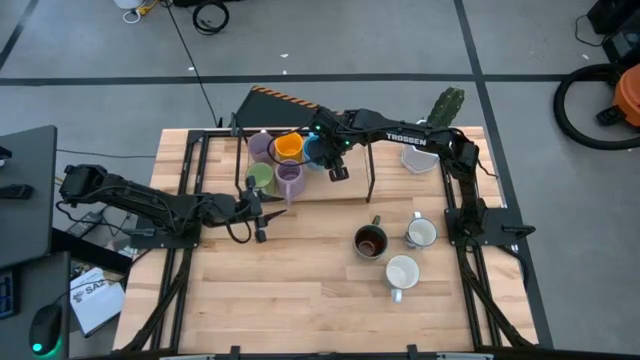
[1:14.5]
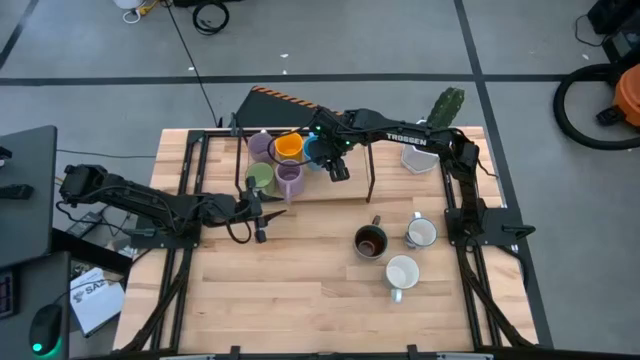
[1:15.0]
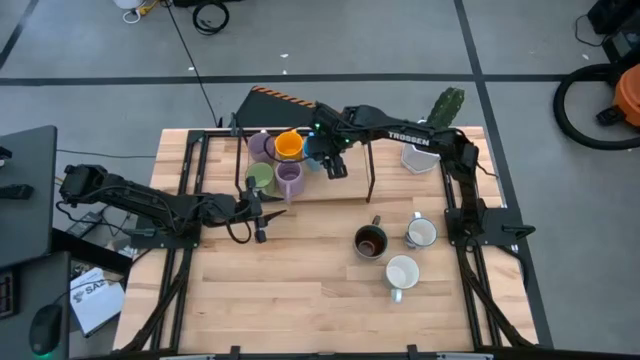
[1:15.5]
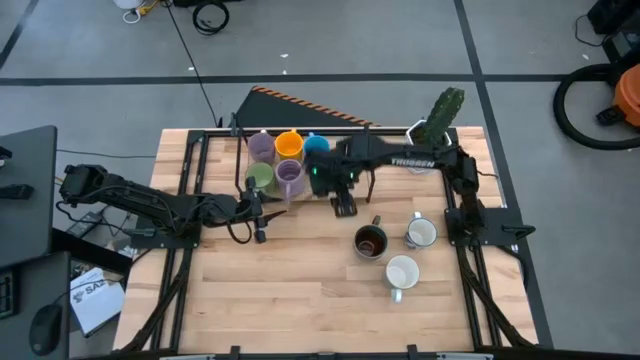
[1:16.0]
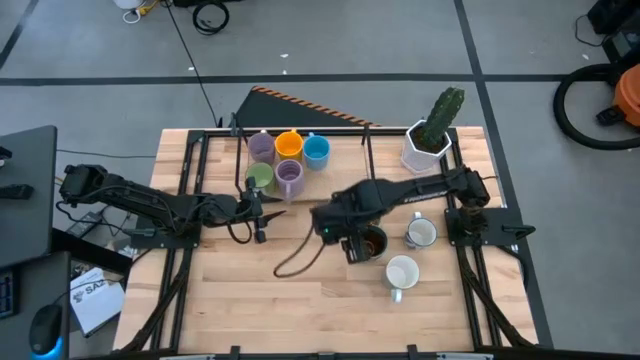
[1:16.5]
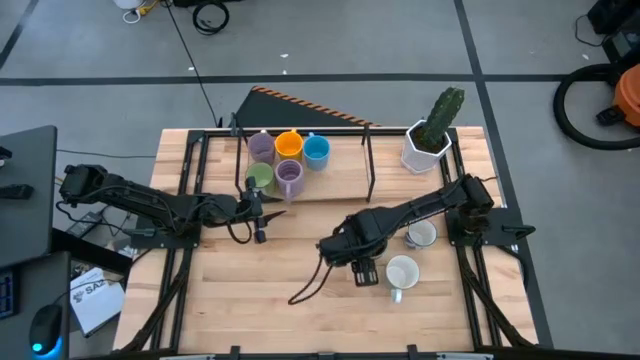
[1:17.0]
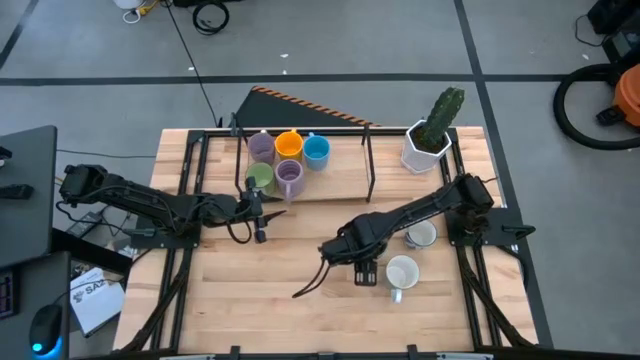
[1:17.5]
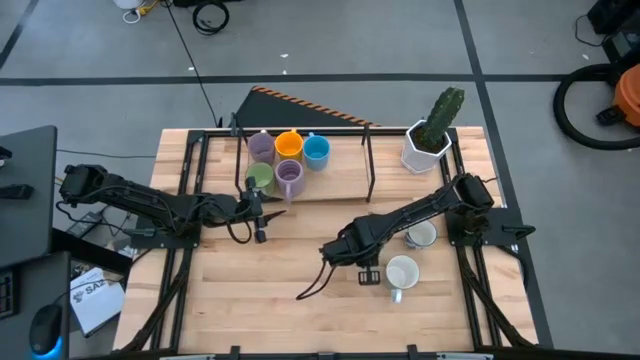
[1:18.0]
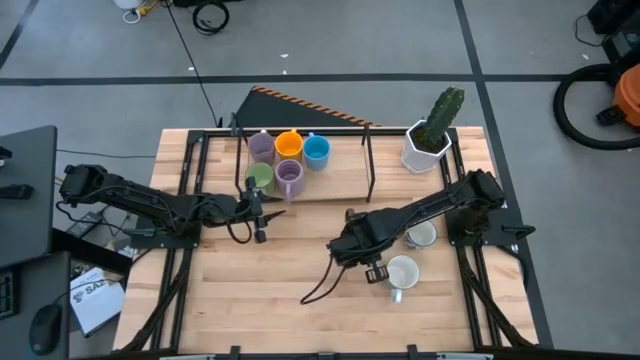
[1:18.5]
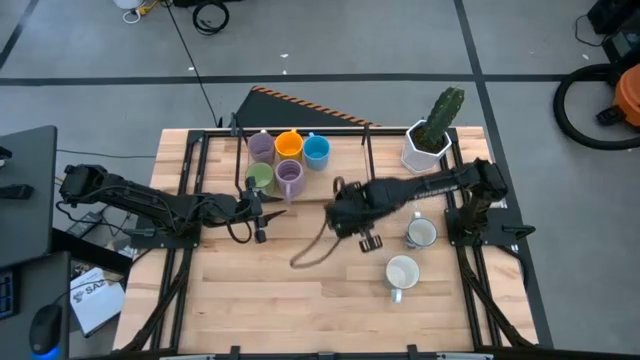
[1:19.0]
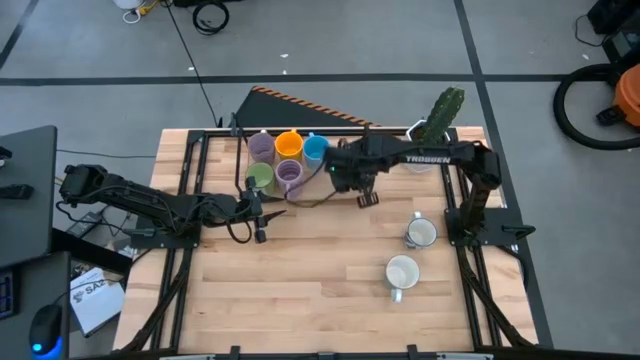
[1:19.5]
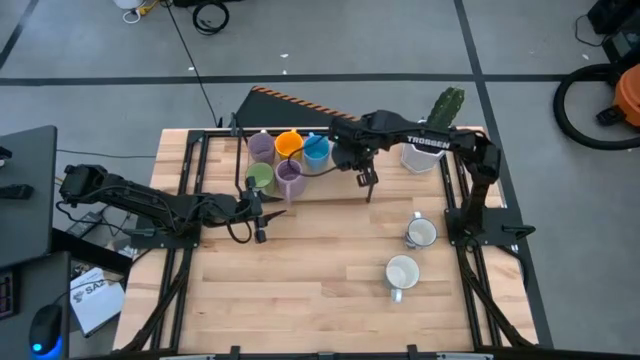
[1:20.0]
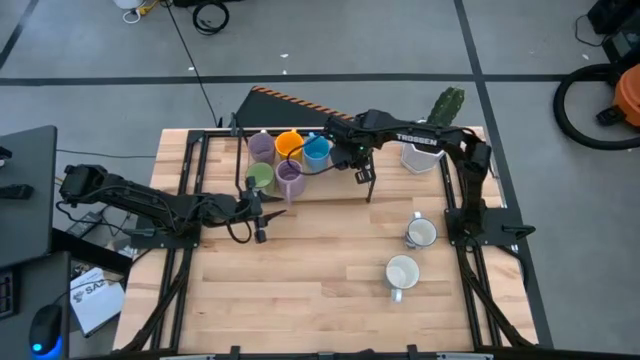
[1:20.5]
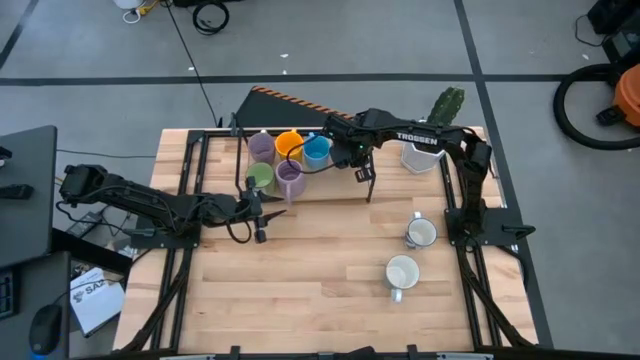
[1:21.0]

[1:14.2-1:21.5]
Task: Place coffee mugs
Put the dark blue mug on the shelf

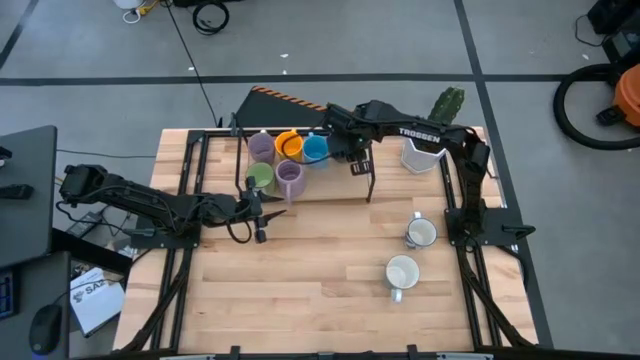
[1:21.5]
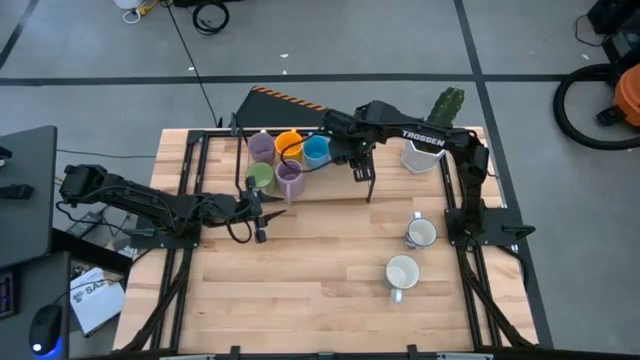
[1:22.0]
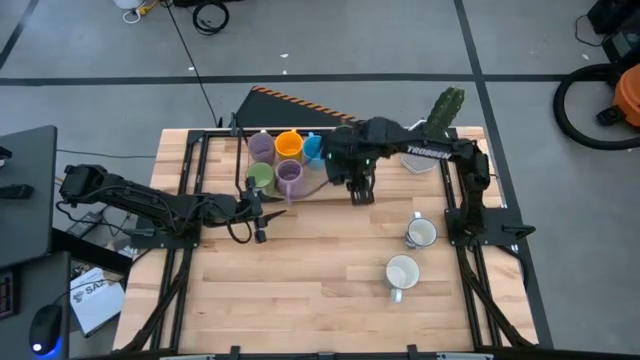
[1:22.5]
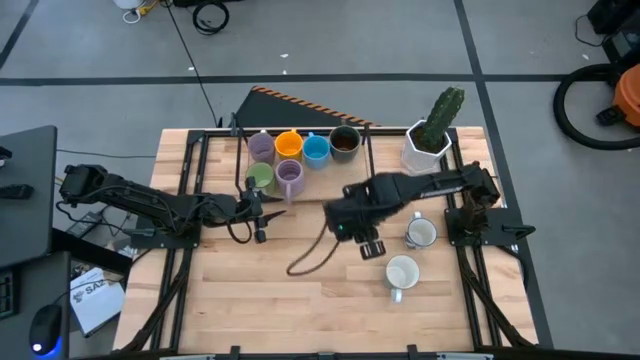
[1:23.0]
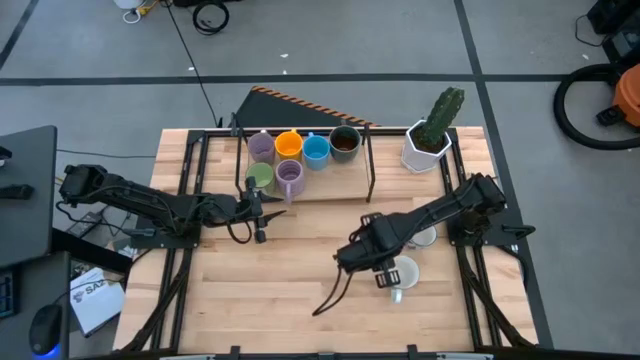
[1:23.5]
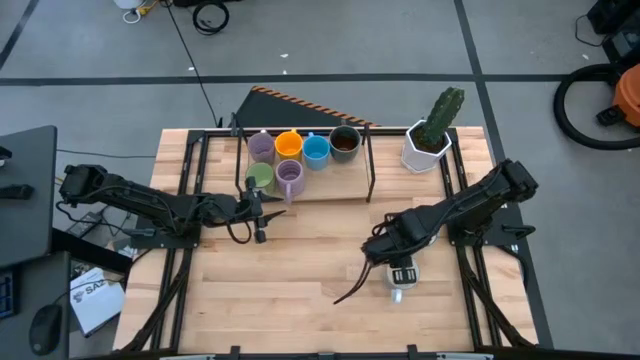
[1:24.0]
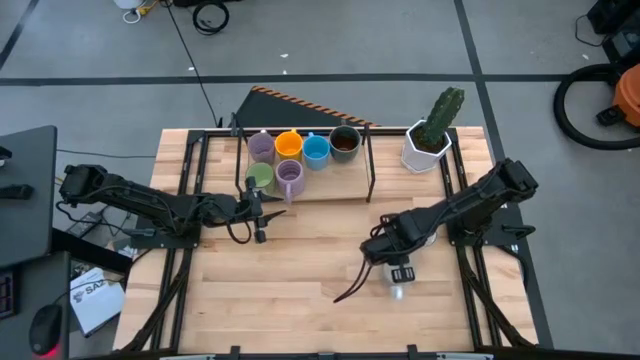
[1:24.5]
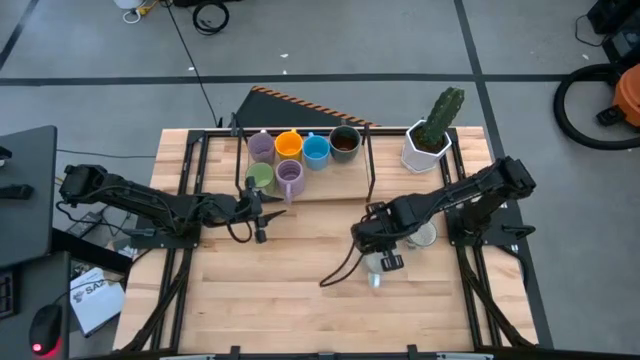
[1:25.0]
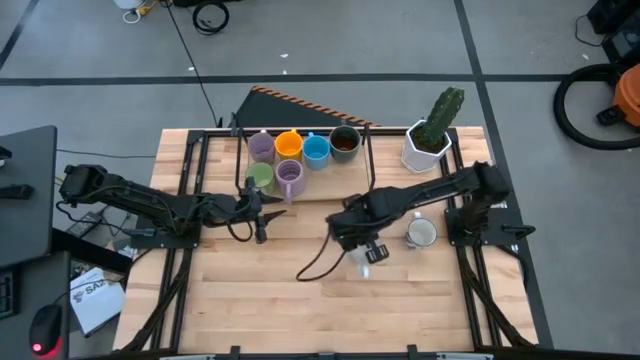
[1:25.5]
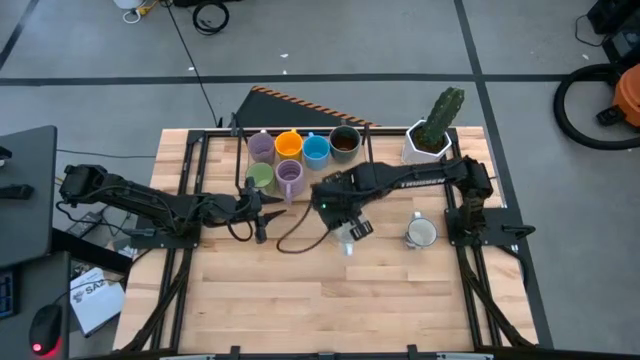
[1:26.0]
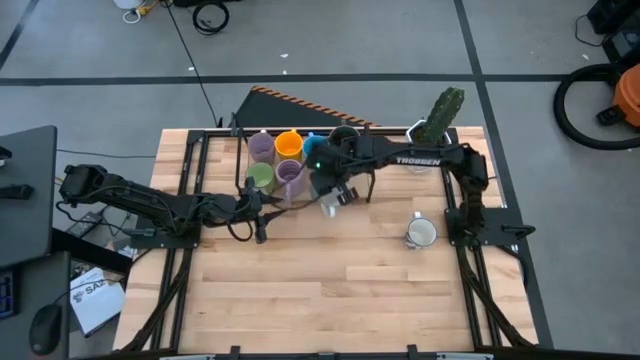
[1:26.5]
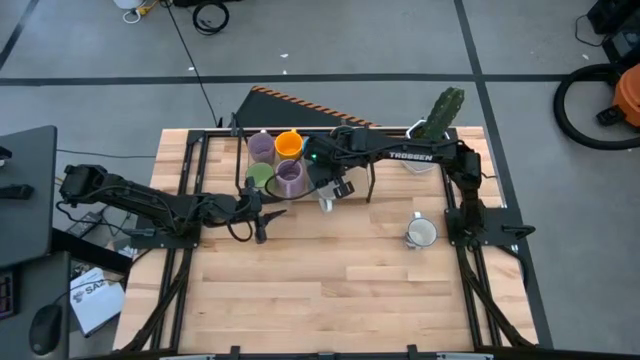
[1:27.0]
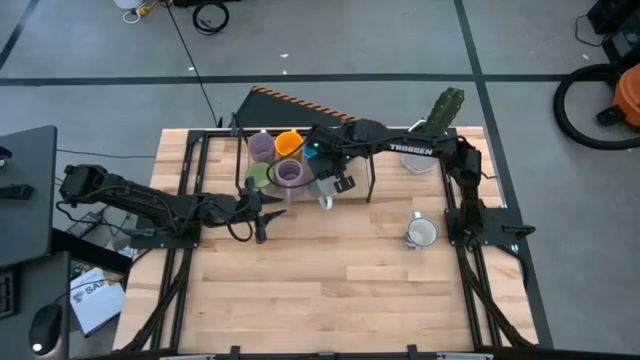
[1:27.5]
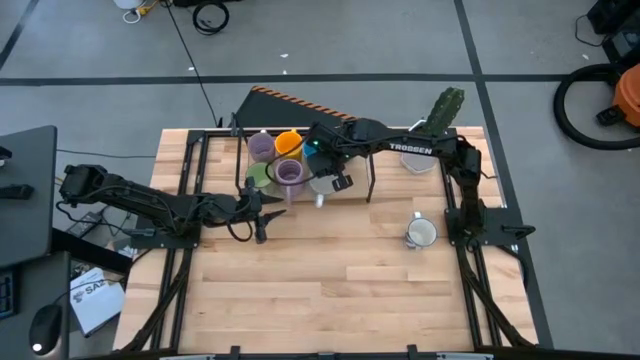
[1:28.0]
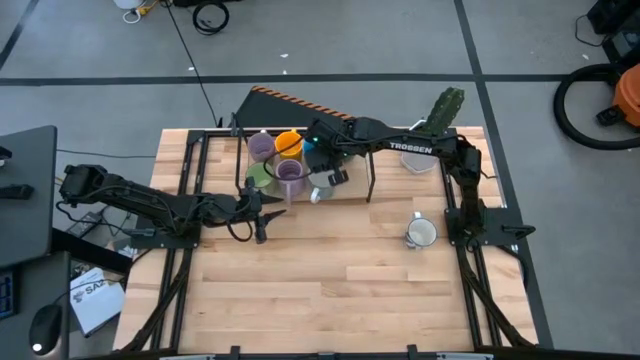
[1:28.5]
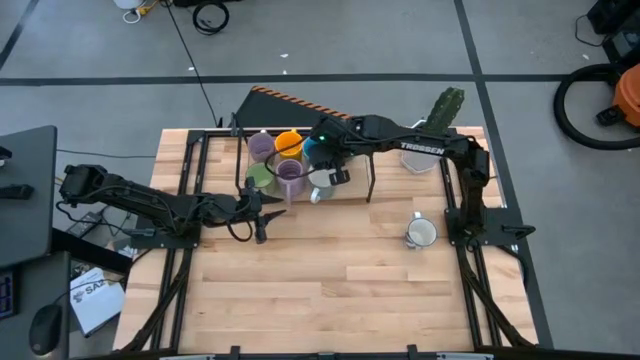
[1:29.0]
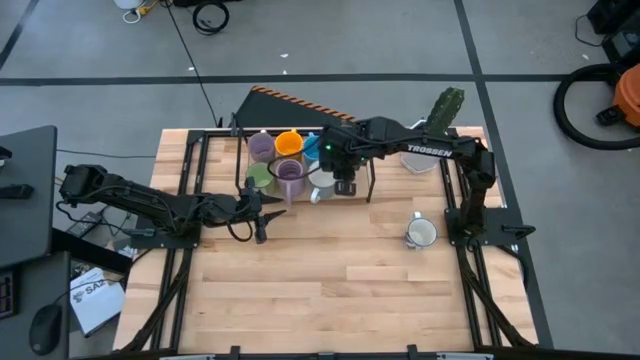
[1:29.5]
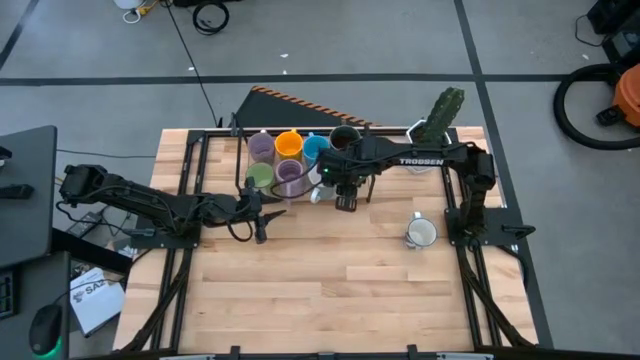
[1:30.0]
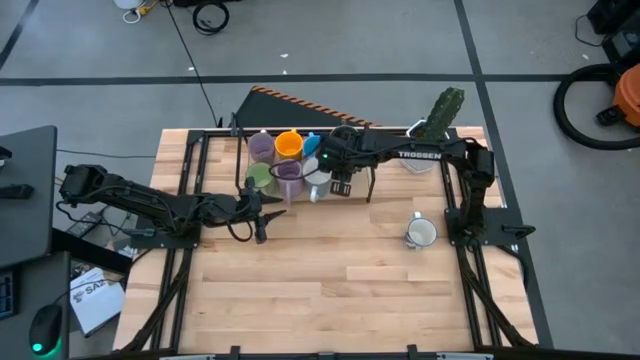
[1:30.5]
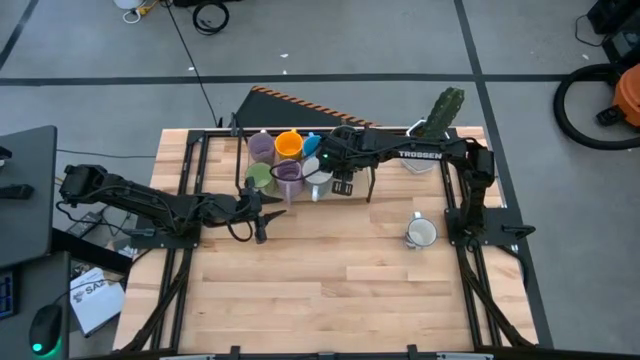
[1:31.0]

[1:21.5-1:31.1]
Put the light blue mug on the shelf

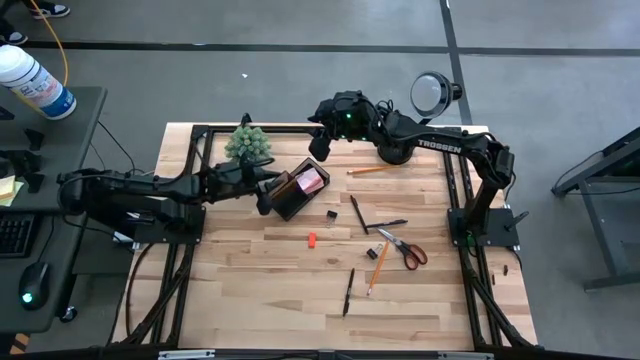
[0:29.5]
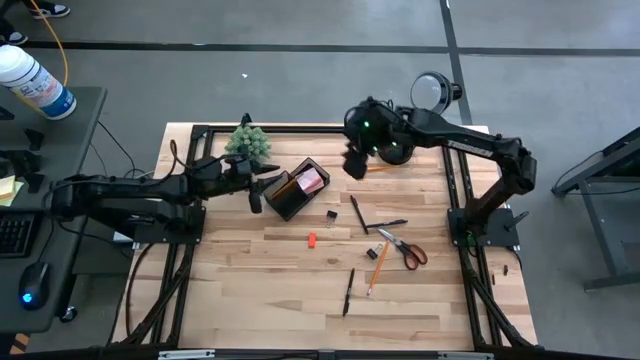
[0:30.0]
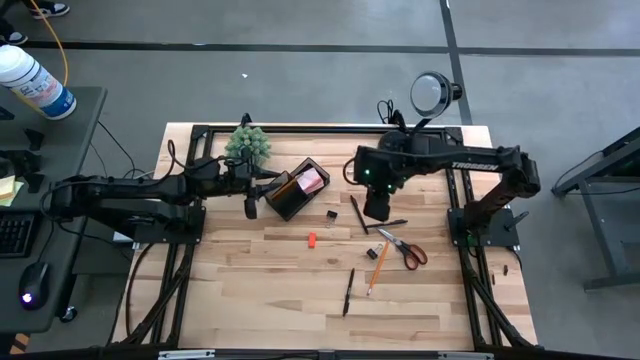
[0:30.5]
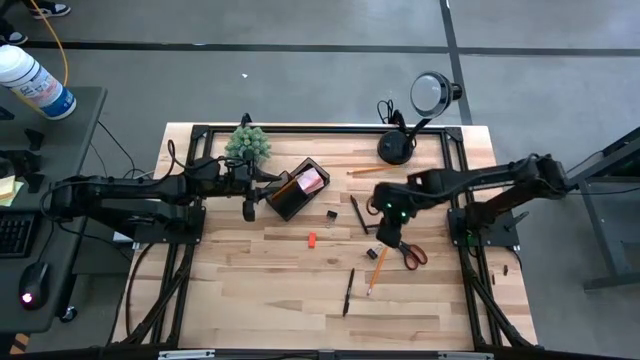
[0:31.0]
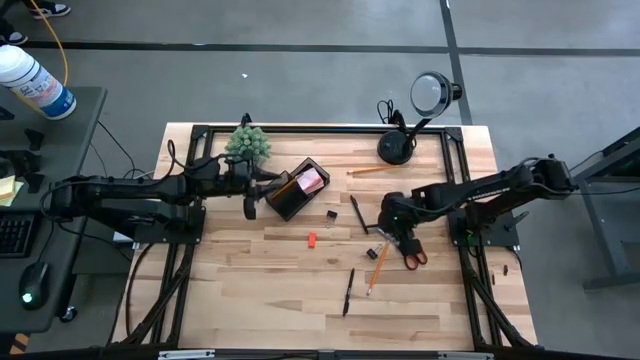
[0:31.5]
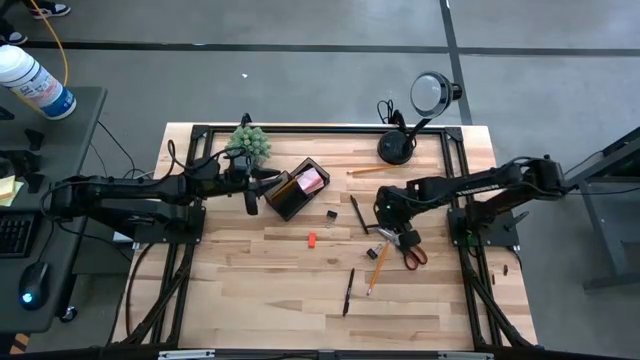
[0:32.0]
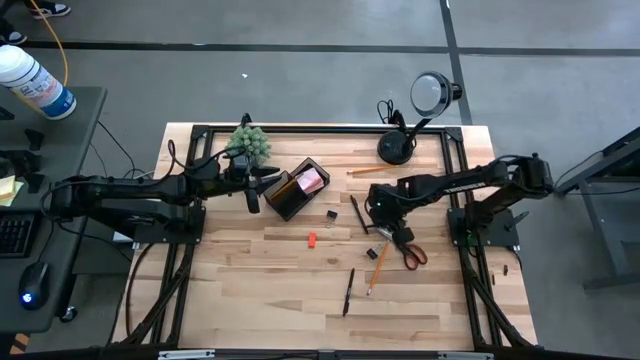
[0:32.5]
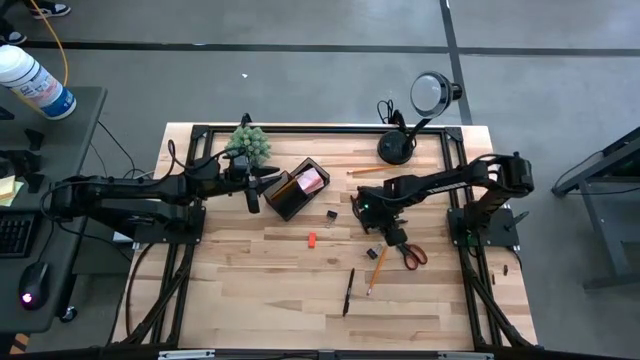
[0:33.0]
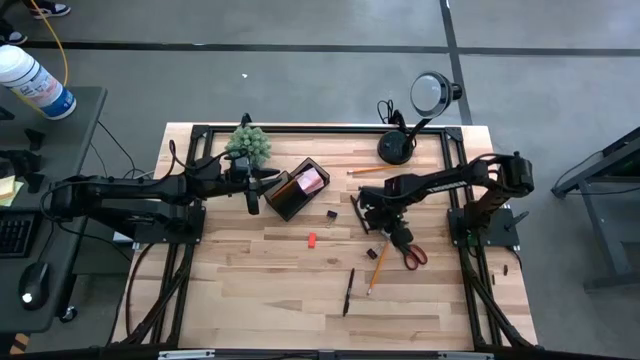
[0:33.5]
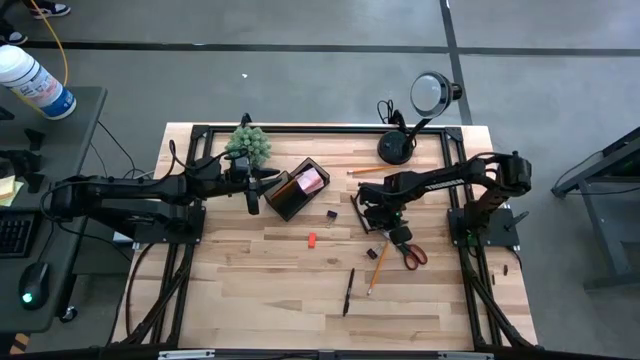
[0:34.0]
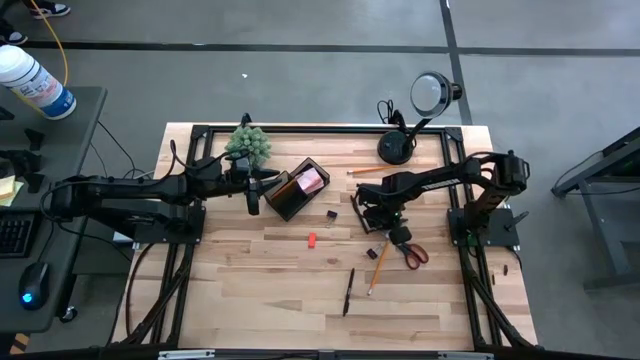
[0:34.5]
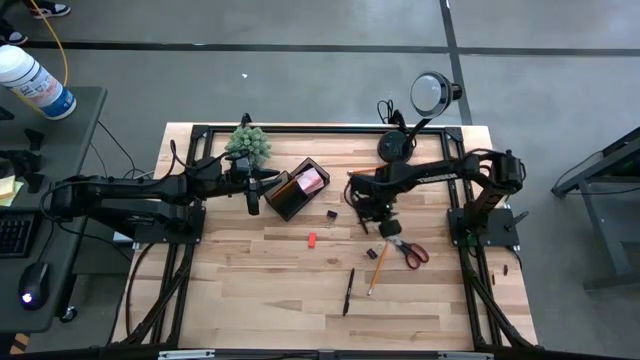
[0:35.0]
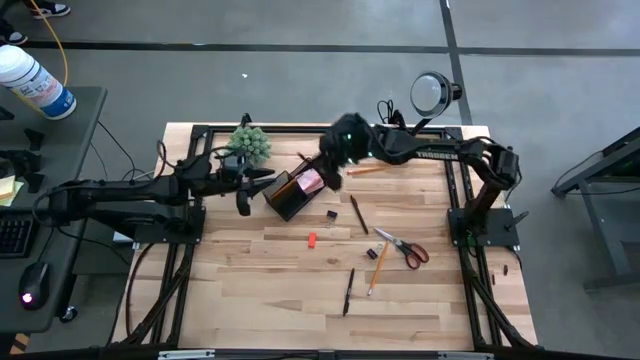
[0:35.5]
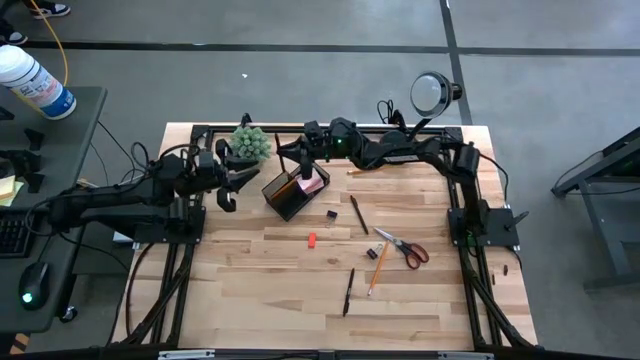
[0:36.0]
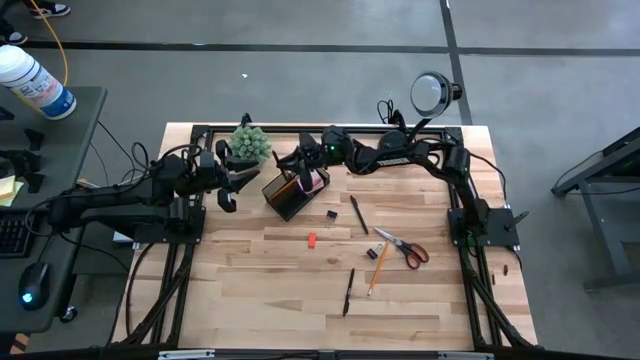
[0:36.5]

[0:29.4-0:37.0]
Task: Pick and place office supplies into organizer
Put the top right black pen into the black desk organizer
